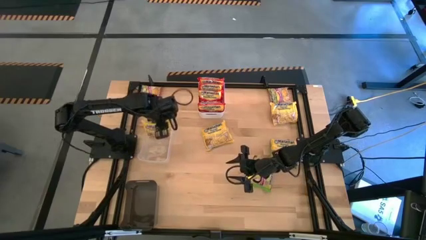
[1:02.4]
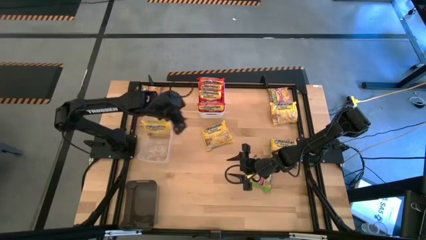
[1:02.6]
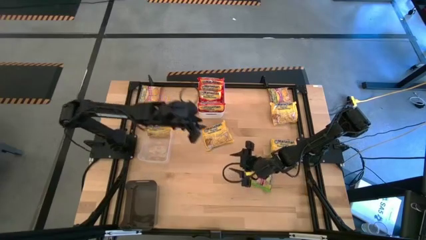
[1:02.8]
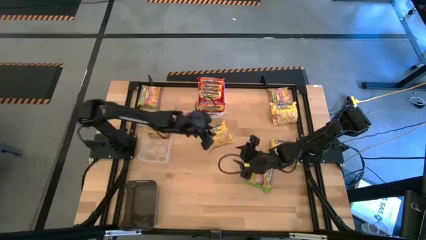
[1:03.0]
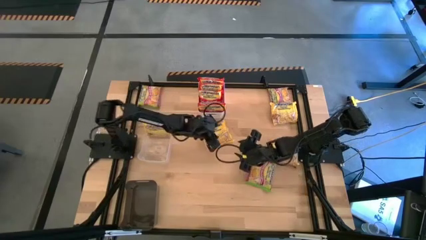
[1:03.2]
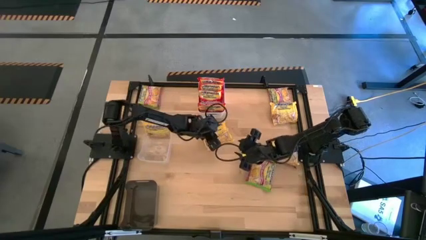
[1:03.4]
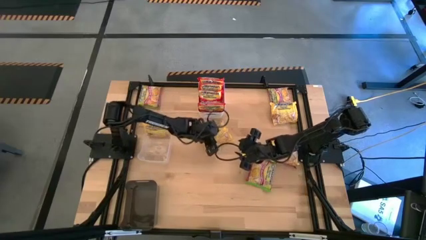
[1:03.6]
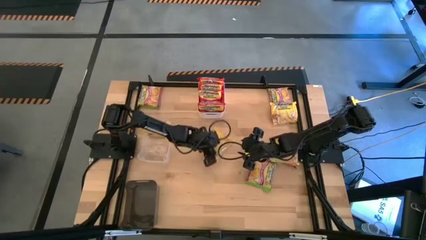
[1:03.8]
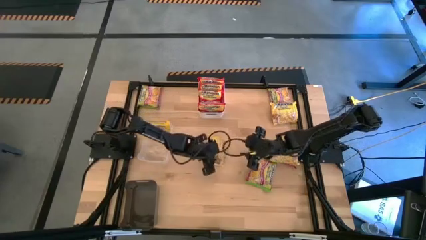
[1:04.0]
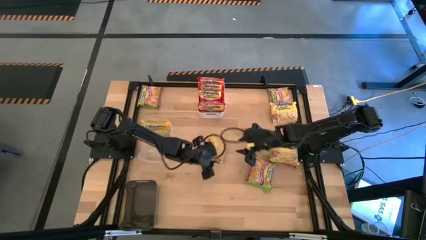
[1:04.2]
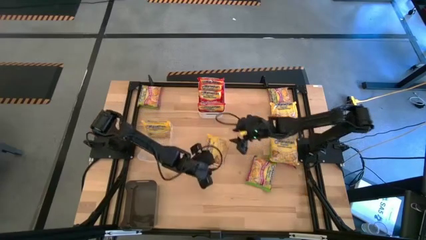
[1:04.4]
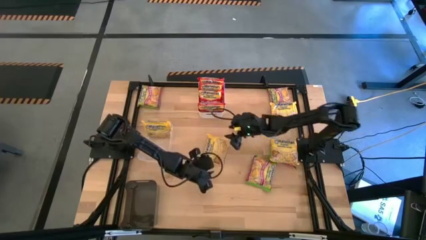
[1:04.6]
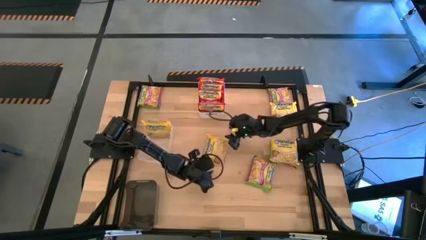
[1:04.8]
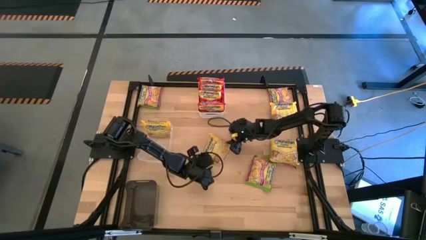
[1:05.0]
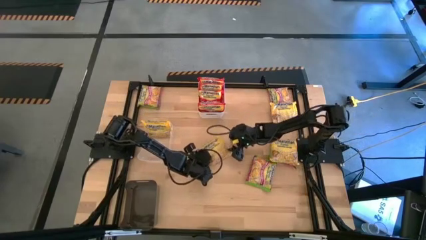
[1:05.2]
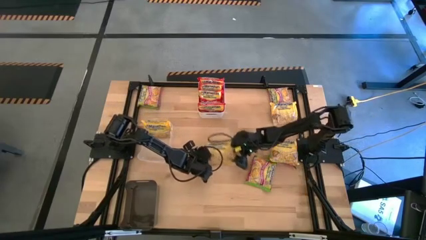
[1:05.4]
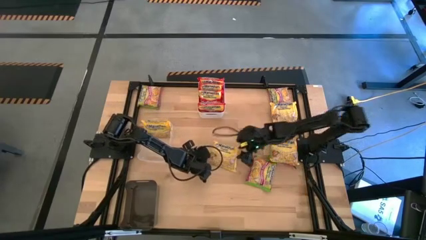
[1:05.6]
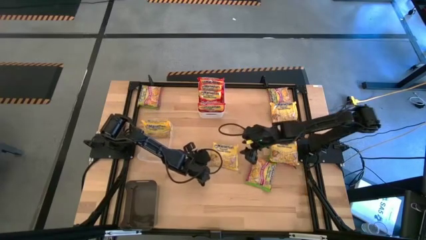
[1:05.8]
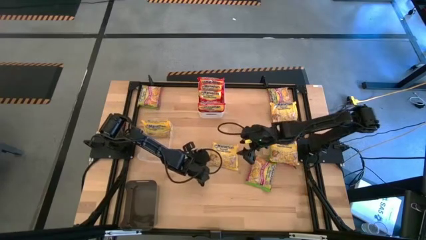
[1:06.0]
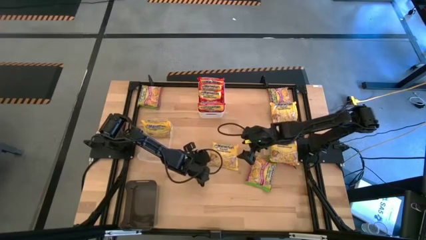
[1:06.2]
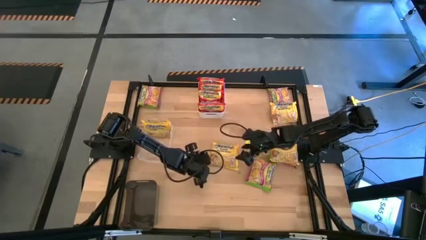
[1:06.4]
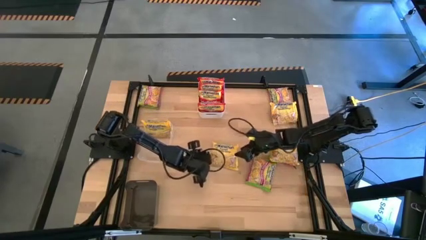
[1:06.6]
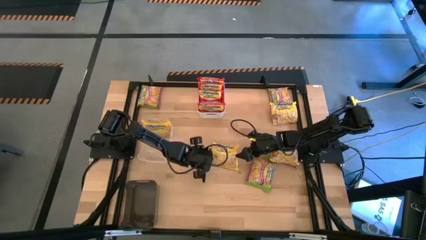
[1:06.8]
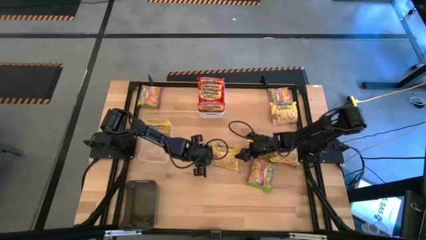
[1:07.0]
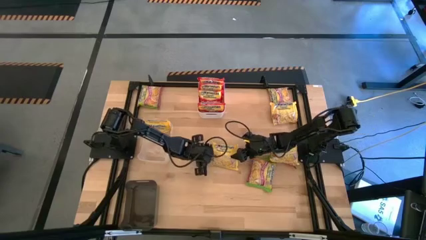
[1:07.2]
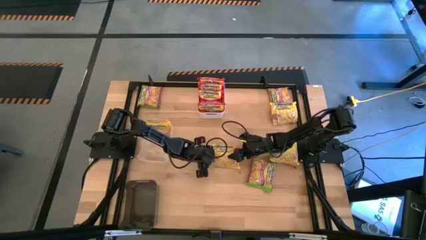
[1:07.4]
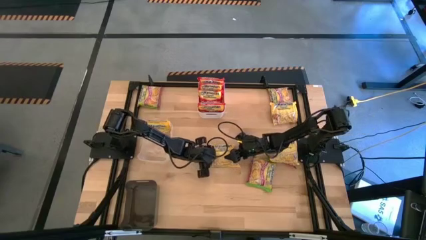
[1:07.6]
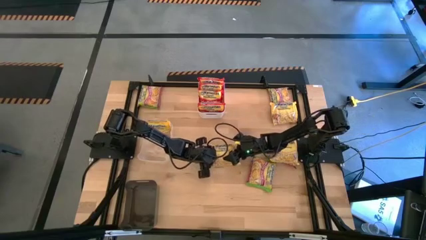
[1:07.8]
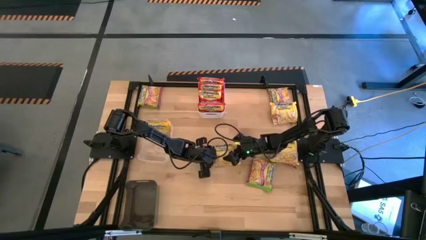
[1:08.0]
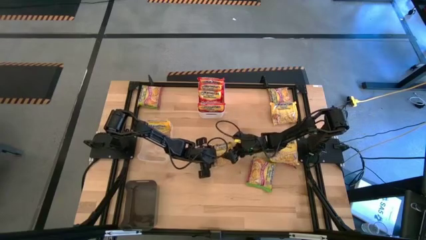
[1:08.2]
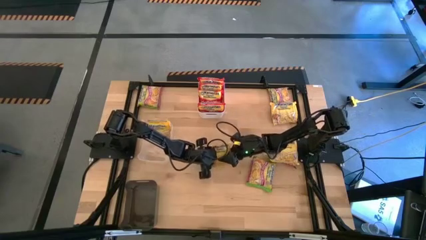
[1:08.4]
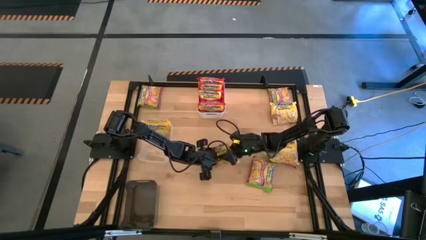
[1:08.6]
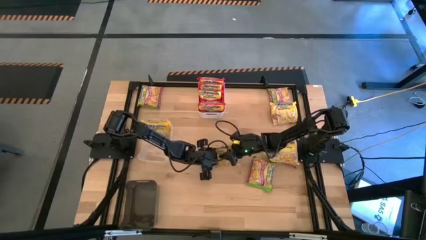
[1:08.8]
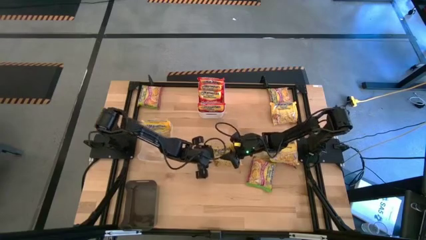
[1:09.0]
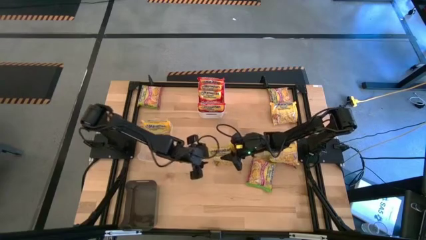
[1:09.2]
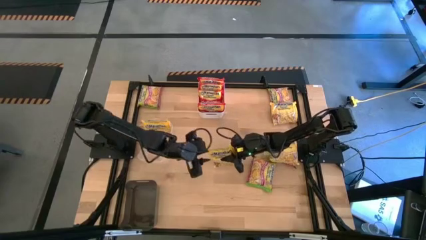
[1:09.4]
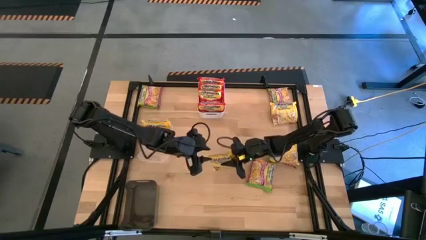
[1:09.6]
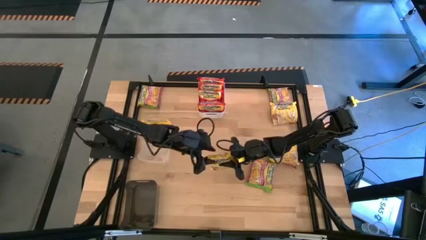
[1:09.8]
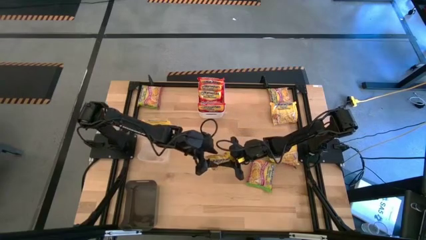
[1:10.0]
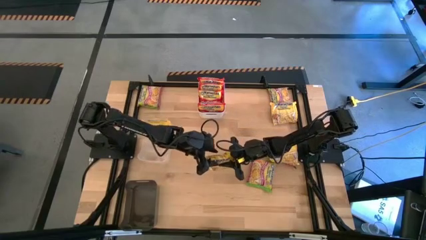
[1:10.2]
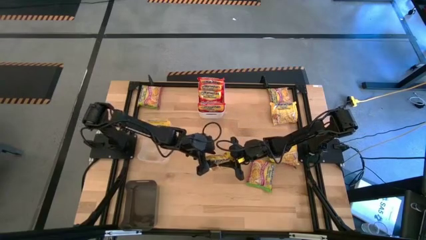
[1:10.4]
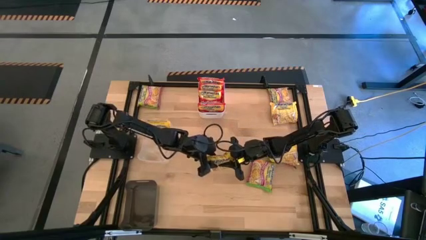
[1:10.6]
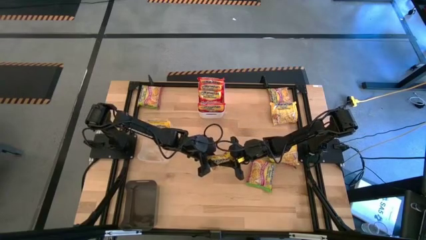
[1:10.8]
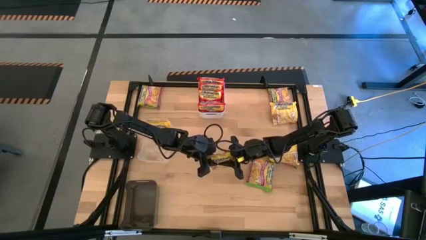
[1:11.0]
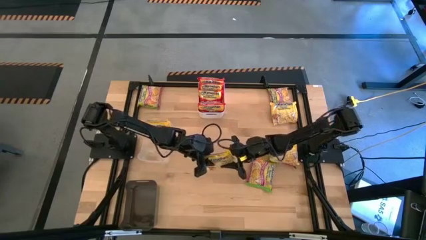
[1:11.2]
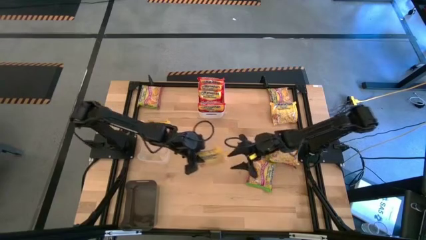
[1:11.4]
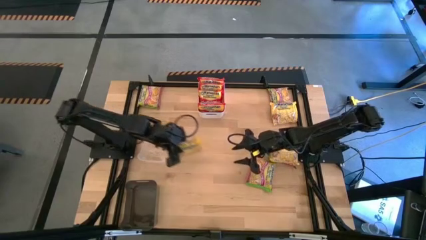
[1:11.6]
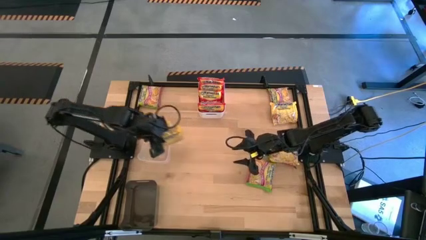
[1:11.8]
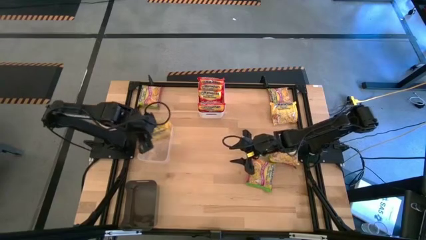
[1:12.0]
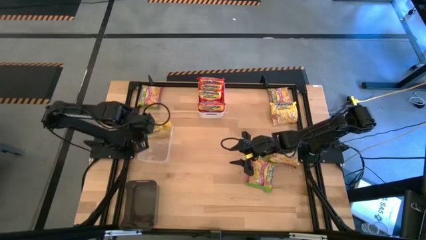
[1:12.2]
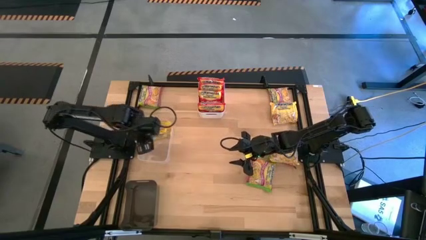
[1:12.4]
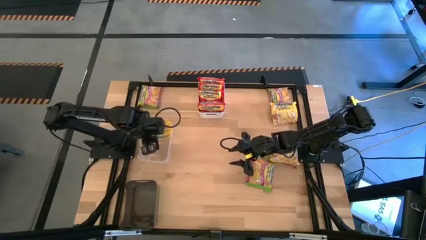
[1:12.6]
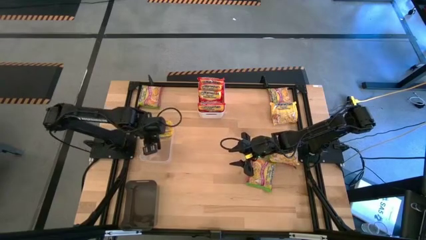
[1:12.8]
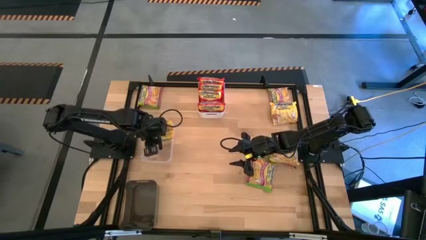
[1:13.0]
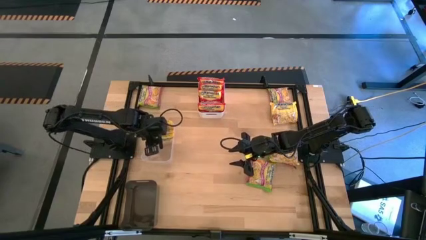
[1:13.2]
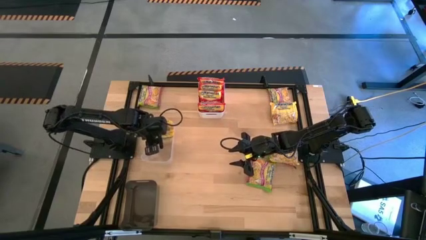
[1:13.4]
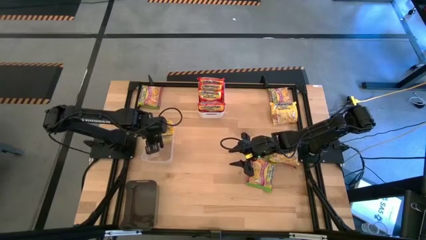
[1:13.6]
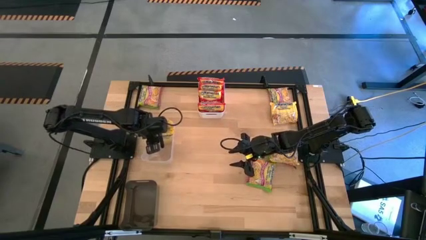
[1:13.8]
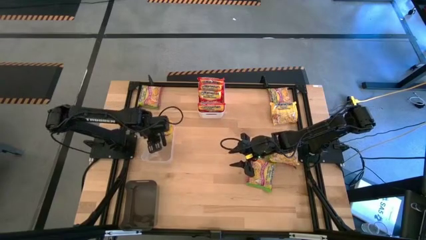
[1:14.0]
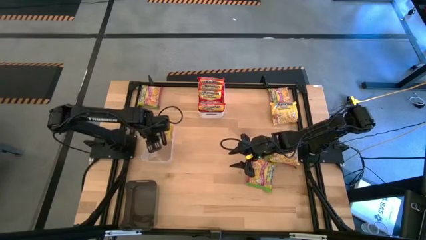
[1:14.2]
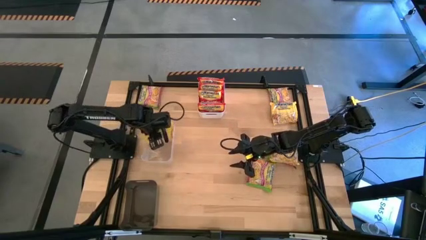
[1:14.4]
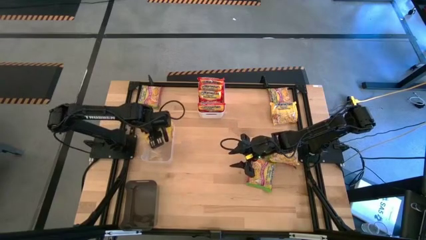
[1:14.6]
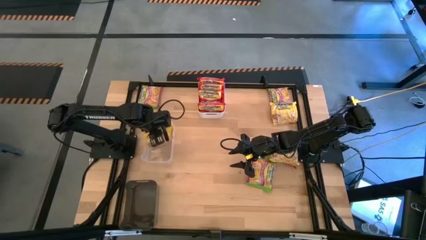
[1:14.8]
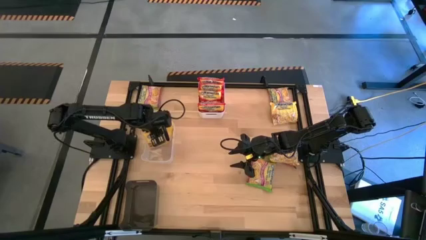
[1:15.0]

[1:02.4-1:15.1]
Task: Sort Maruchan noodles
Put the yellow noodle pack into the transparent bin

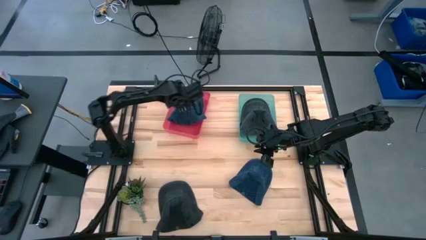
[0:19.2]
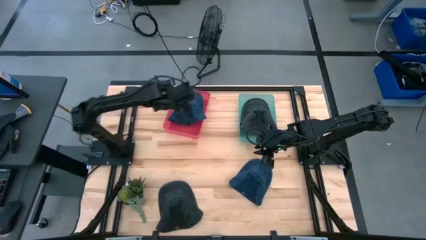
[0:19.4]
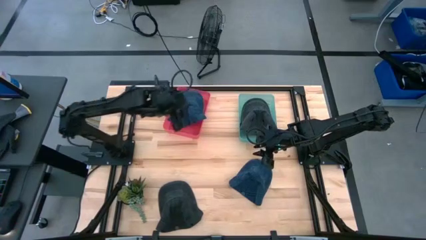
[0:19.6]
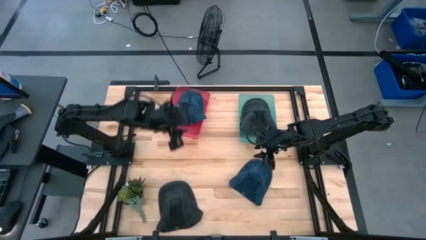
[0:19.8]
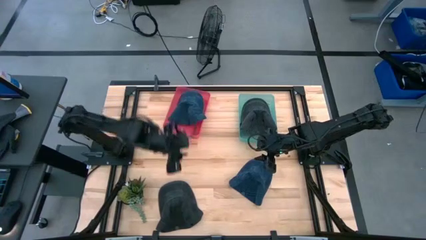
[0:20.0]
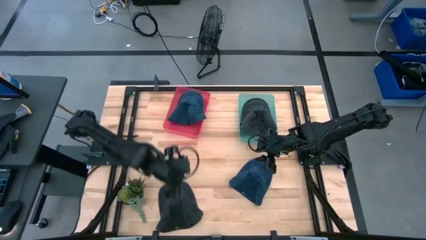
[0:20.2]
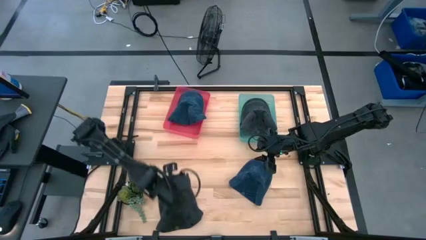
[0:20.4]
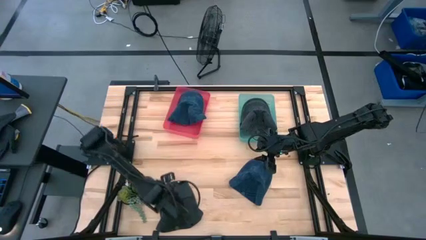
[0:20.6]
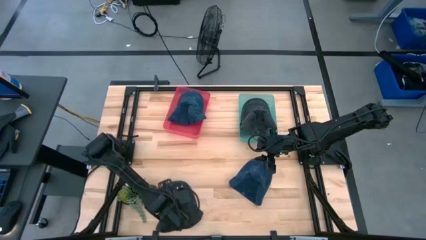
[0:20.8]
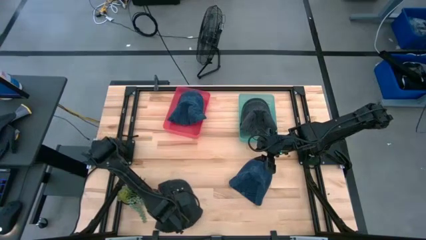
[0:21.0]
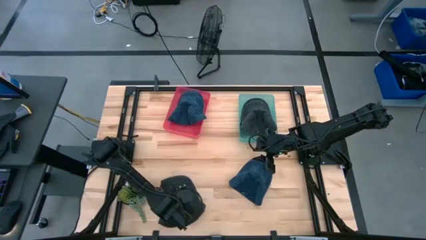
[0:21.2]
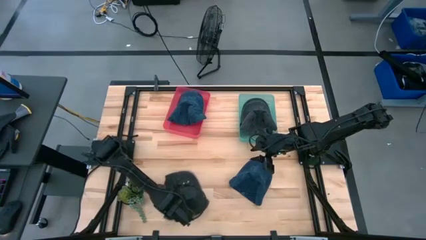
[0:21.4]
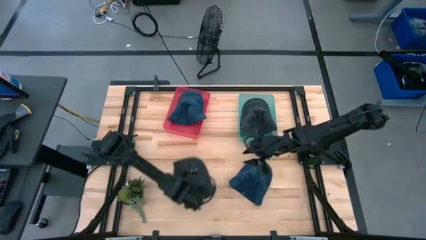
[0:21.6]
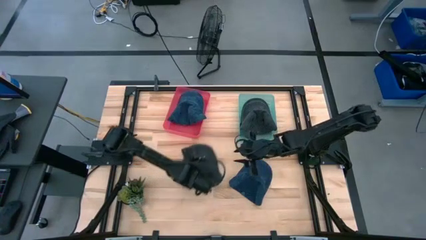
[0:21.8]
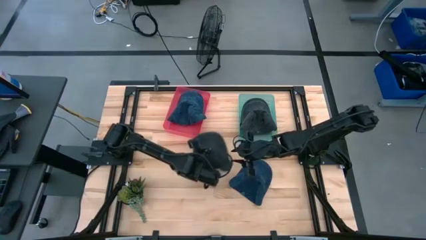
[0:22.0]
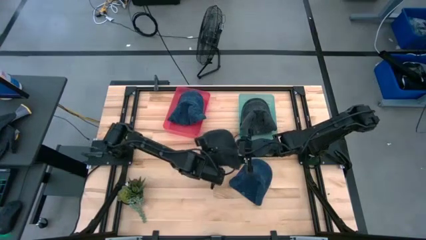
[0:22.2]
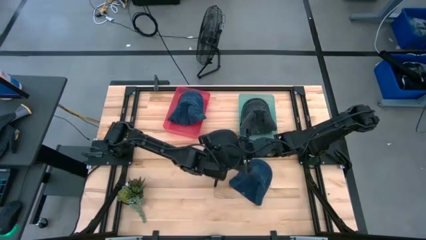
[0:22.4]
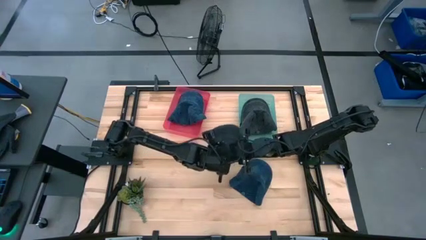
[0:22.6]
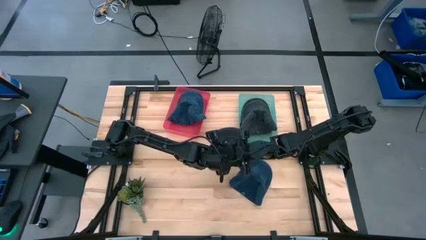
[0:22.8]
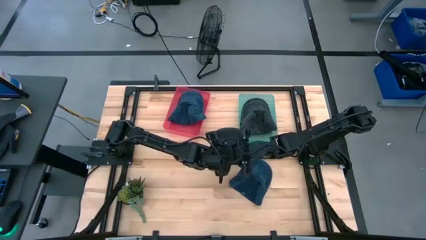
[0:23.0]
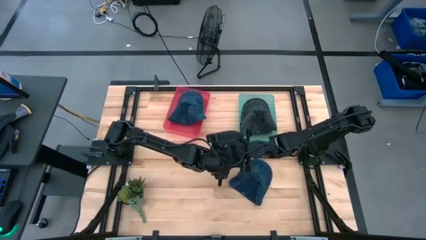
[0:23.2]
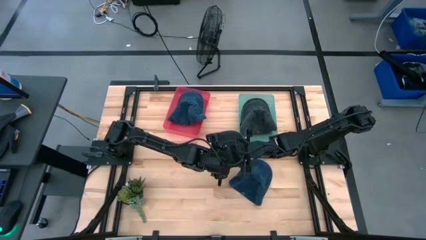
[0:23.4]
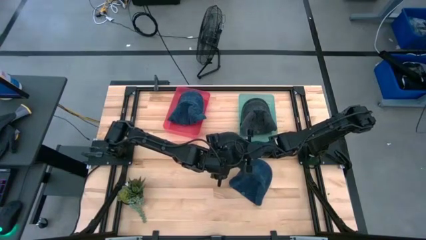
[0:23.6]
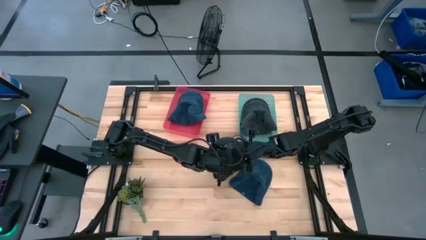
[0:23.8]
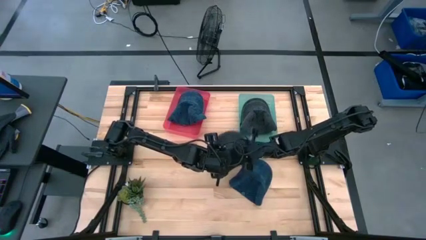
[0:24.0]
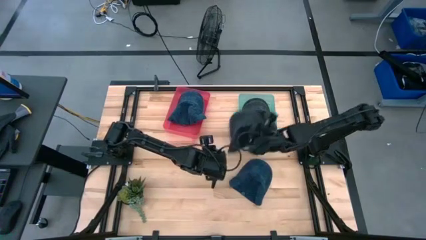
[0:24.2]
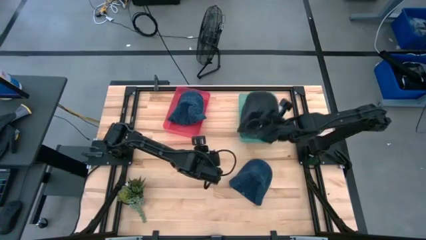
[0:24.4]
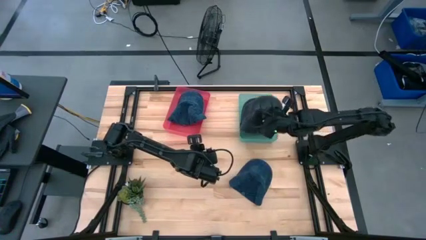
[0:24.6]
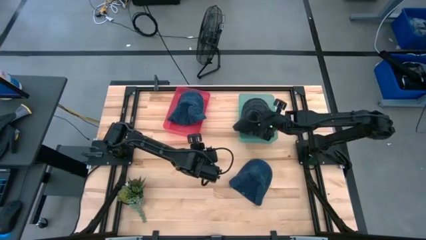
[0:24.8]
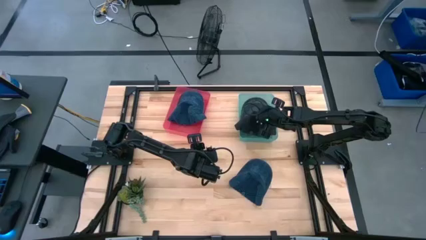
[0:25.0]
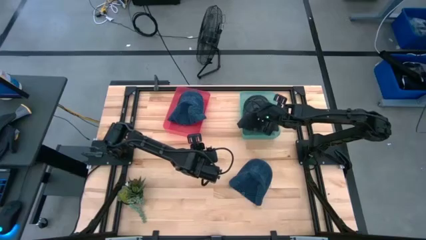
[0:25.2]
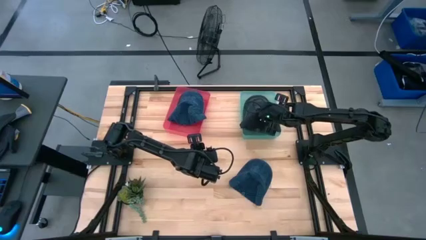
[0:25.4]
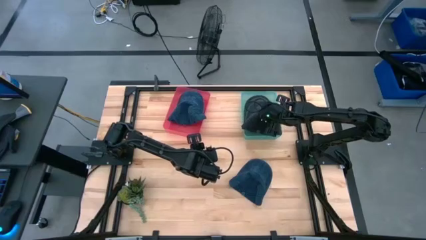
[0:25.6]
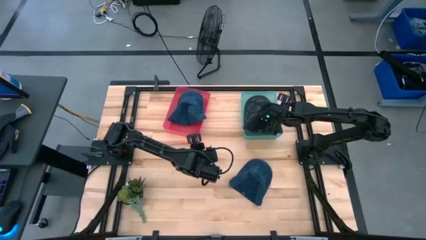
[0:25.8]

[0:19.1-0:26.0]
Task: Pick & Place hat
Put the black cap into the blue bin
